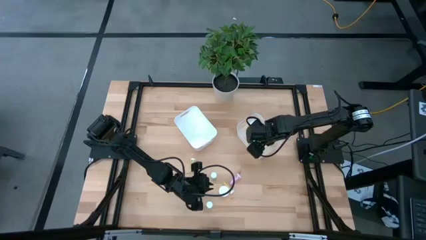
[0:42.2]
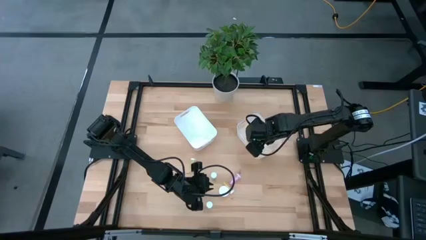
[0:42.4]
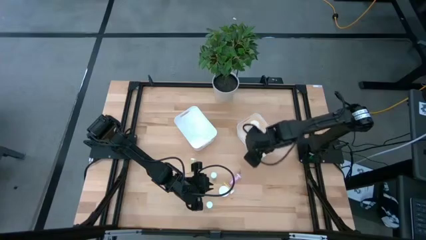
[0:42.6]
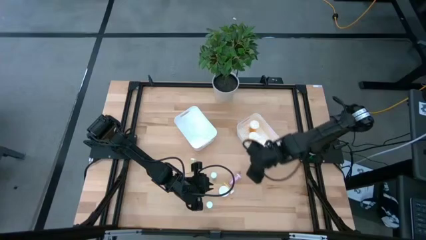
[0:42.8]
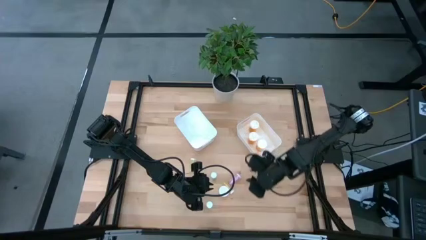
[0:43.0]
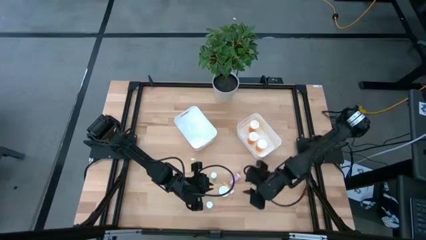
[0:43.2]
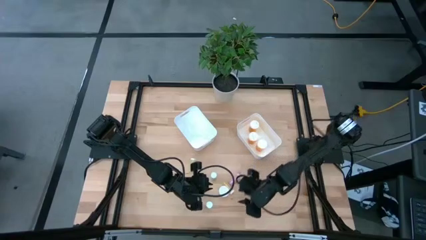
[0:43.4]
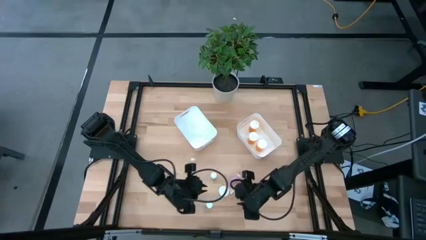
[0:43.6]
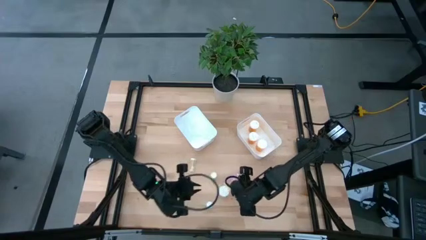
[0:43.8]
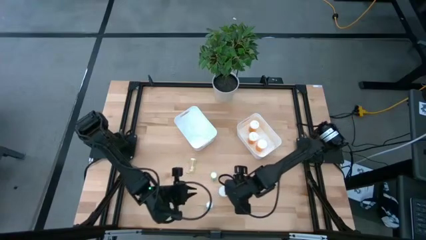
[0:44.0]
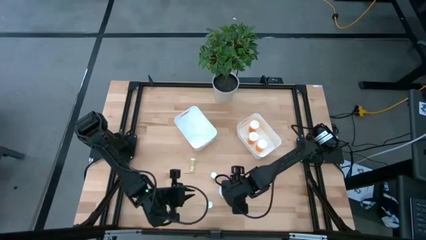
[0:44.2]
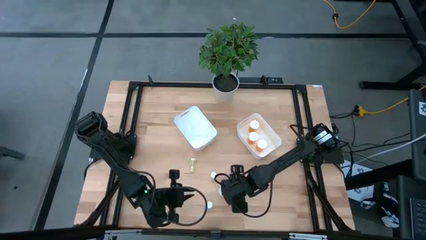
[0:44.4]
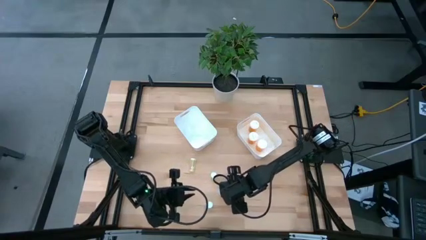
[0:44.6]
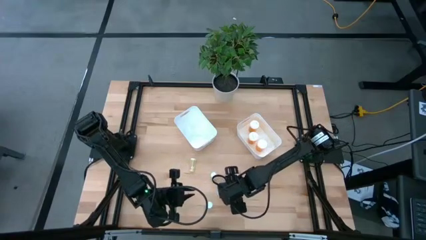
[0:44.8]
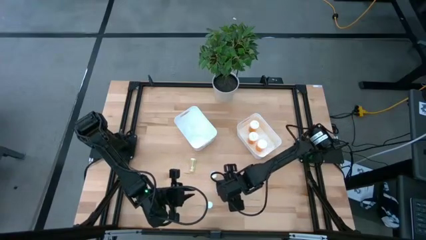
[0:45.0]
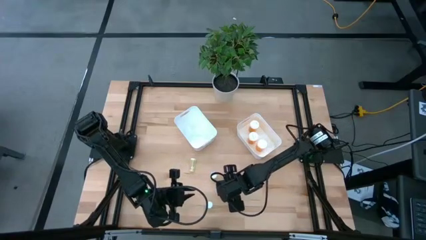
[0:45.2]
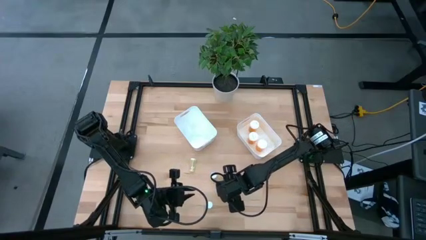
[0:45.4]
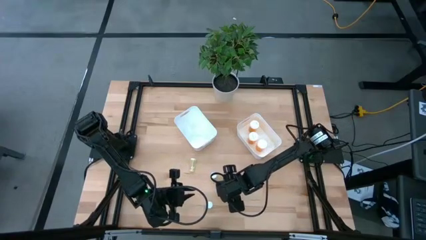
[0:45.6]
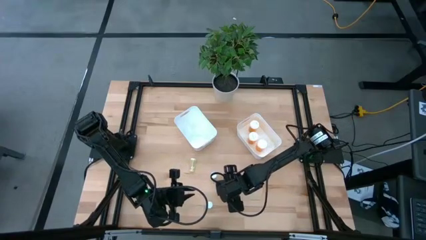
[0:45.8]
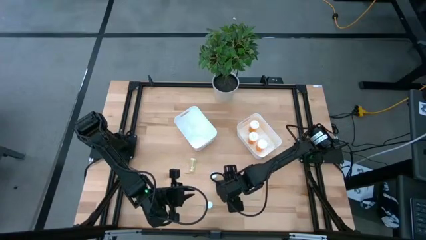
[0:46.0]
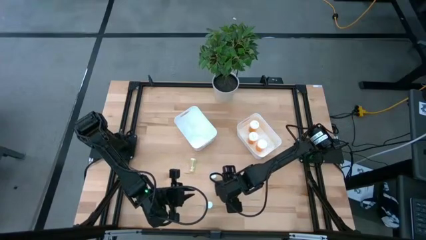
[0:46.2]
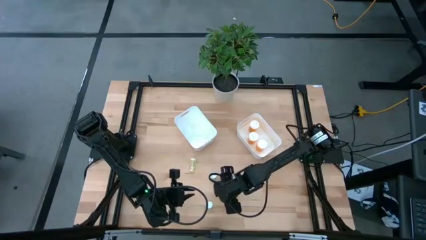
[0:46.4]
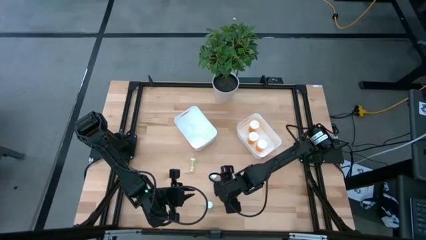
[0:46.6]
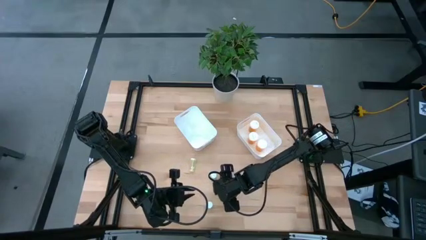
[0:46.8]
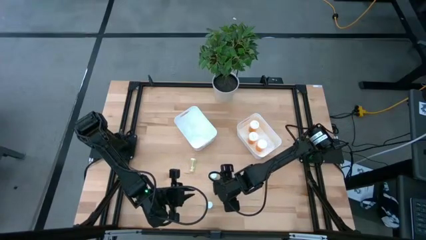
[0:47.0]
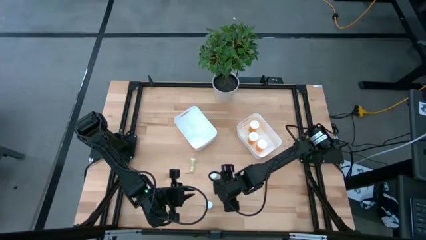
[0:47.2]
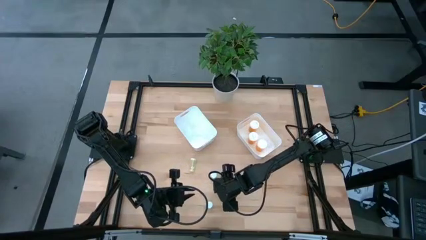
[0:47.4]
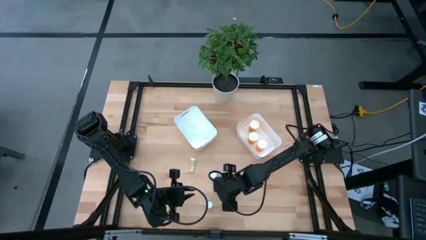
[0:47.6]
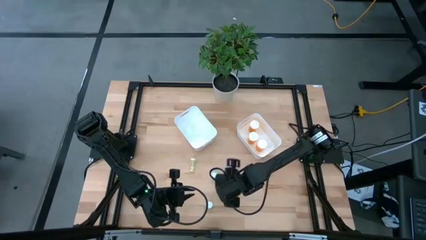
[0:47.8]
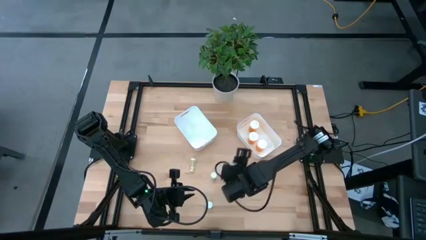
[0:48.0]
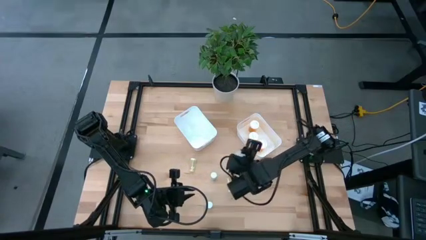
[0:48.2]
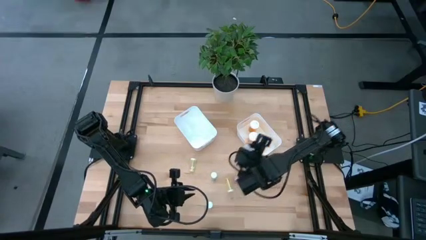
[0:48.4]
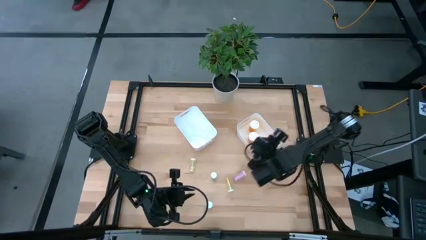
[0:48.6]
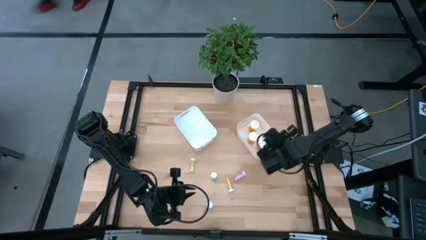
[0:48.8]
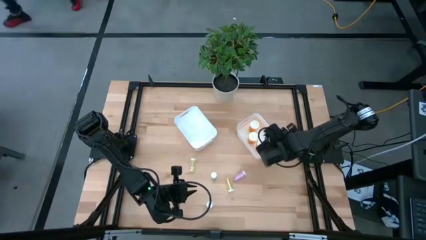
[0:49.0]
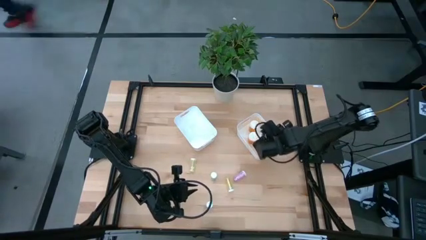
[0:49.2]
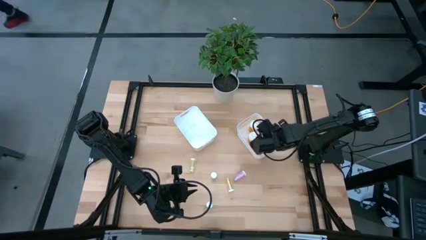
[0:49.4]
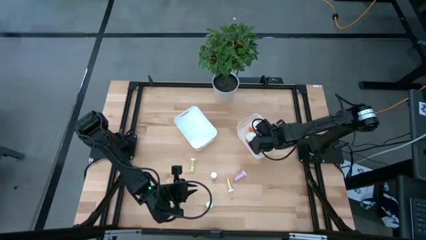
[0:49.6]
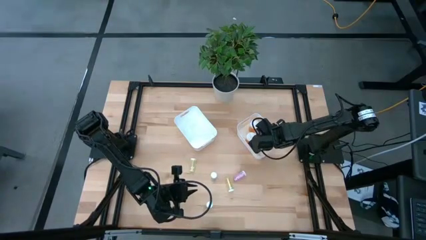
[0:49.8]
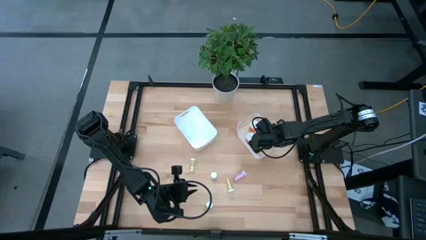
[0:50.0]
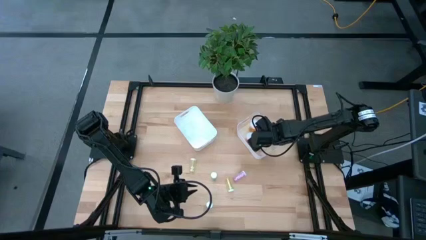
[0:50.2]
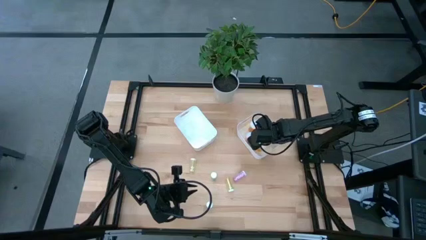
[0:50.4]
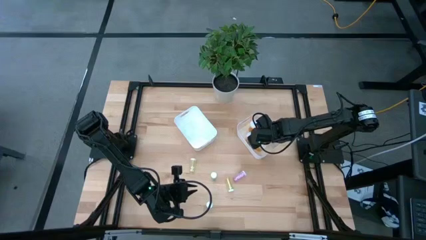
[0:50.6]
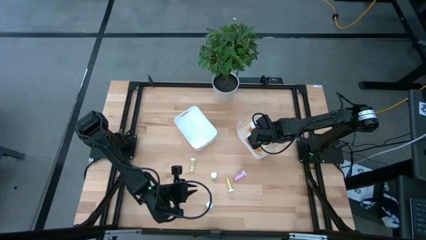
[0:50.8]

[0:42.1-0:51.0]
Task: Pick and place medicine bottles into bin by pill shape (circle, oval)
Put the orange pill bottle into the right white bin

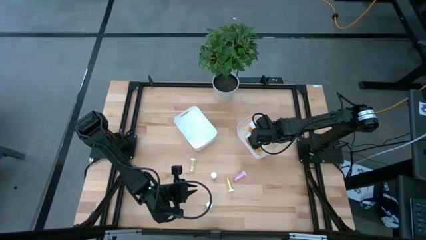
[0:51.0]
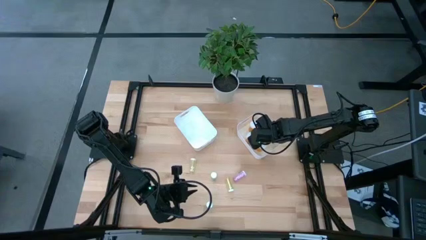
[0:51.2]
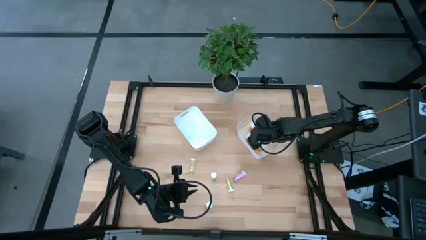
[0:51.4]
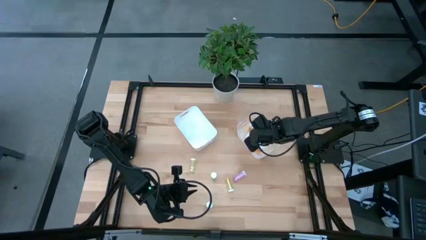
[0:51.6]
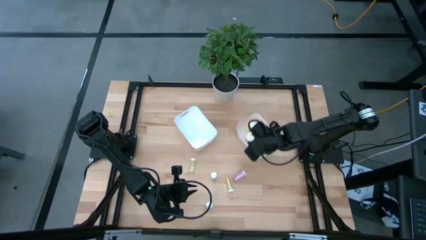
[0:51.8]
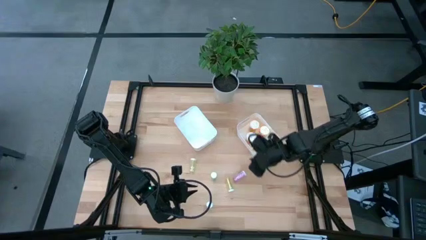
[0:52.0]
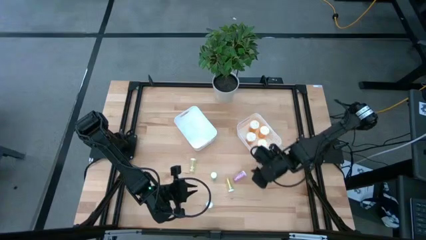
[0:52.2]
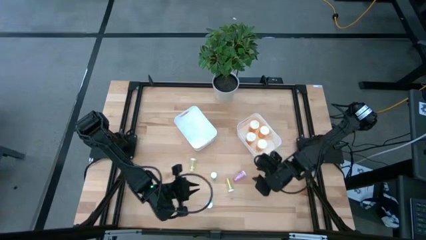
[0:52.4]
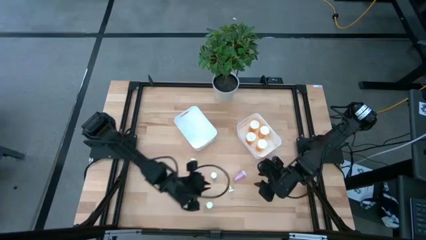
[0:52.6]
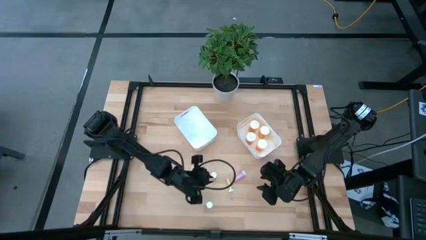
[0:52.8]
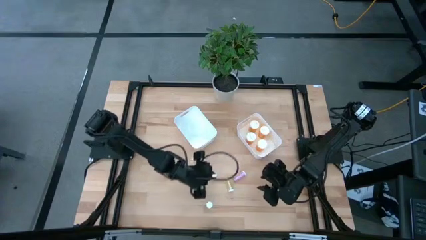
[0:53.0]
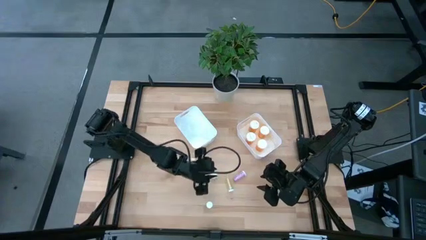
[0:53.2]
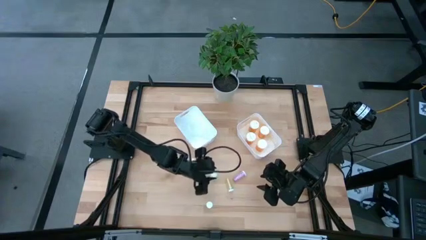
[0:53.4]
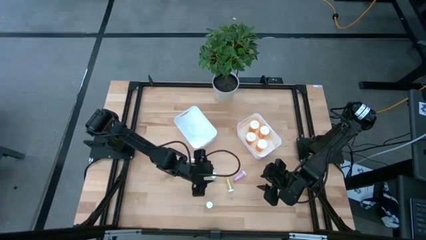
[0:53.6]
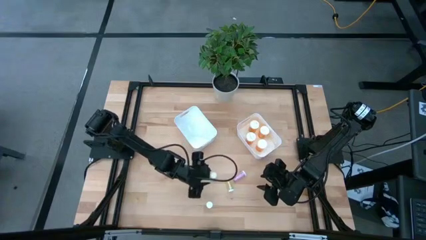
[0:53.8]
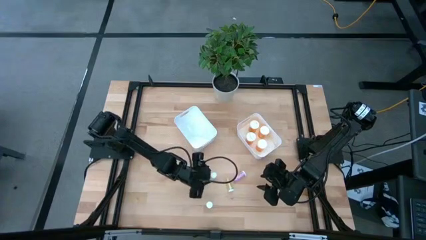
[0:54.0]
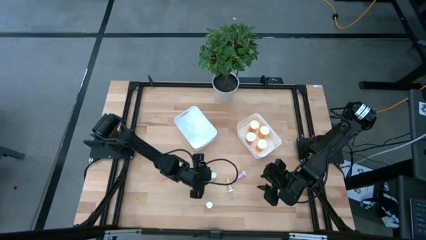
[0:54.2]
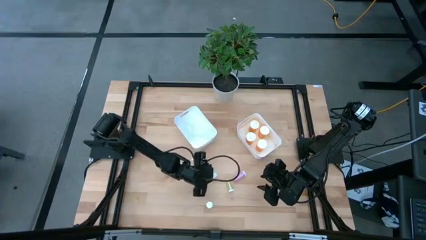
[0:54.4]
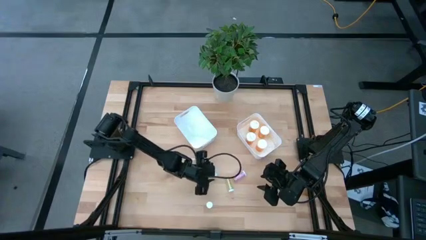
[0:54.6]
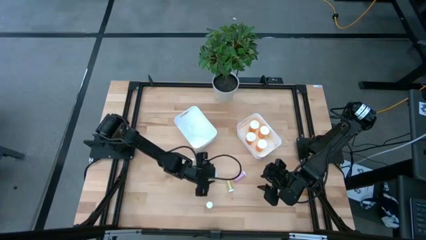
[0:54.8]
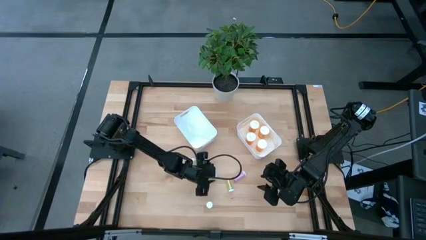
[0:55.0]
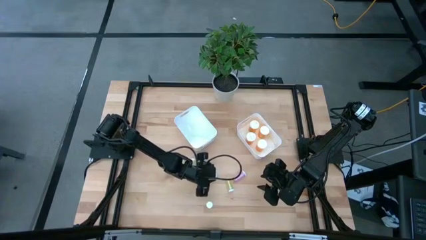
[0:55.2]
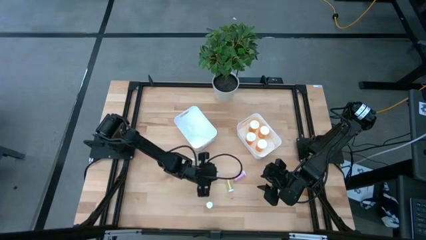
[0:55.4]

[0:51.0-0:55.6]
Put the top blue pill bottle into the left white bin

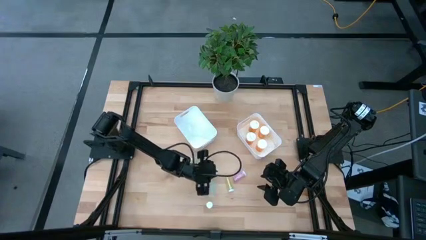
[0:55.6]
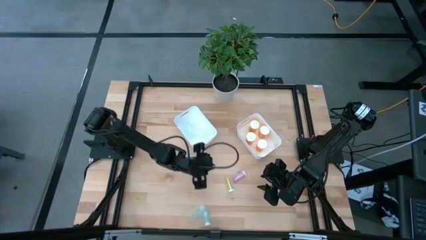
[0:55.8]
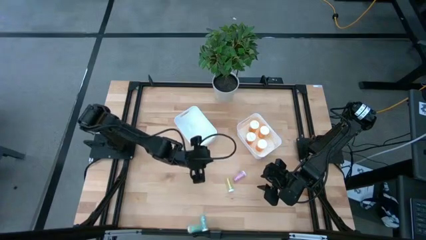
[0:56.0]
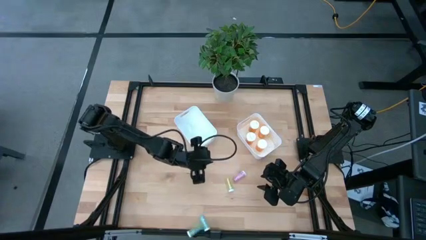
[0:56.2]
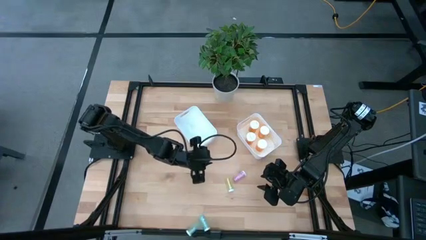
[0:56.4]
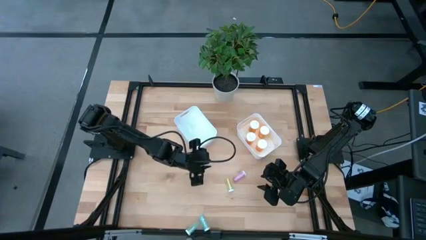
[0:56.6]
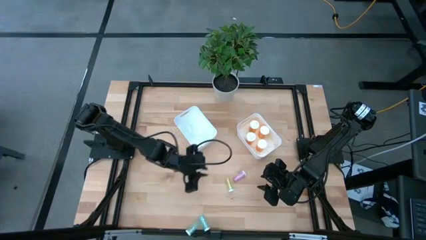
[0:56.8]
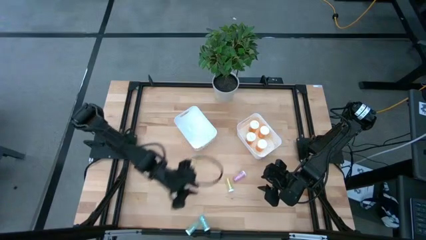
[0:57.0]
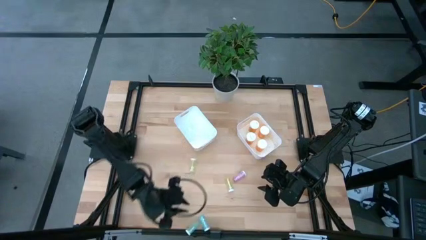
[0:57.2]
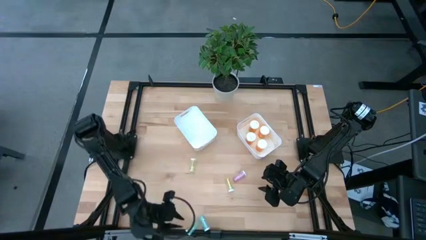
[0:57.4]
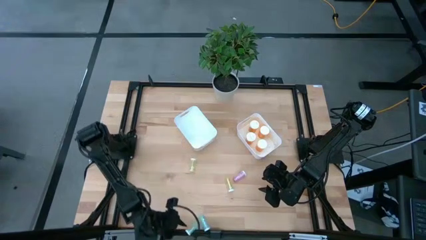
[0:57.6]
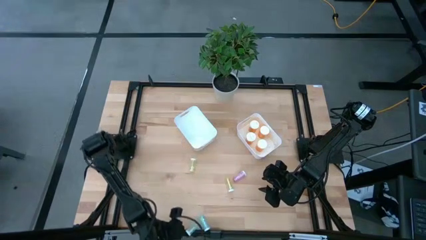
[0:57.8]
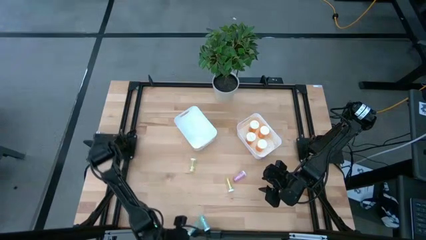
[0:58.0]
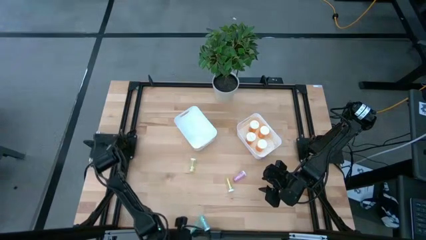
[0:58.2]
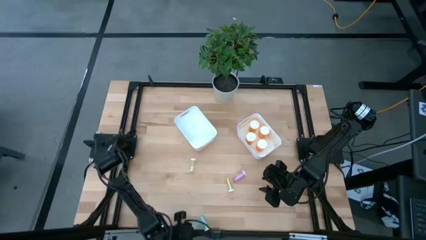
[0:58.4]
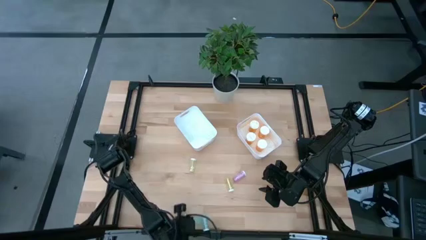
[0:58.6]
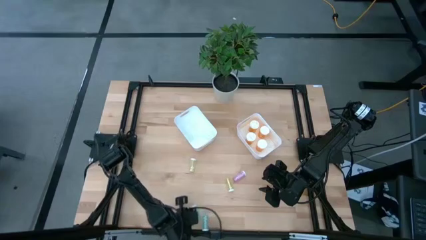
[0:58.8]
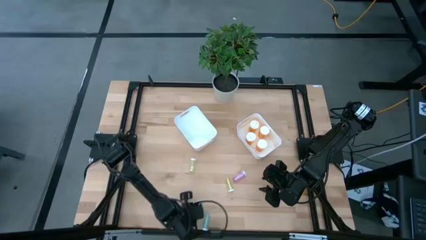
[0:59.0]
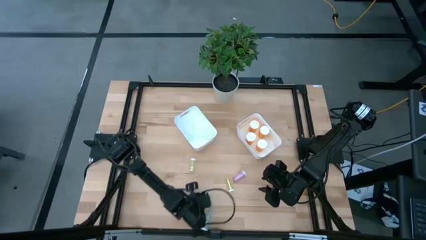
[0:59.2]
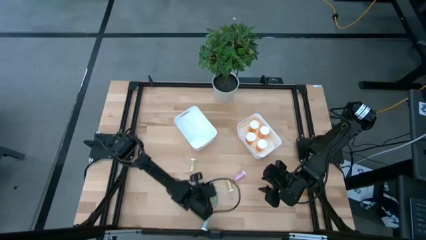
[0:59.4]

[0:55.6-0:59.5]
Move the left blue pill bottle to the bottom center
